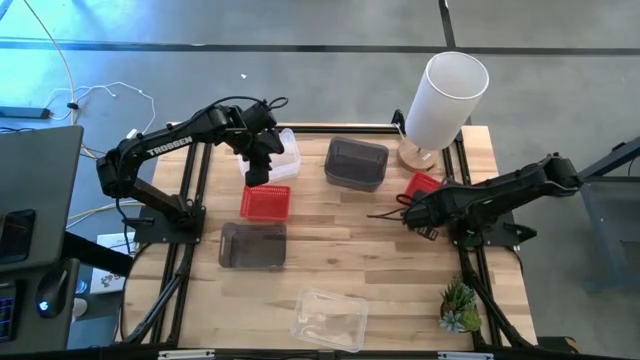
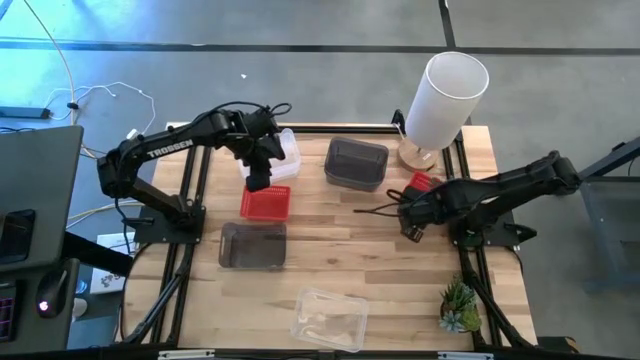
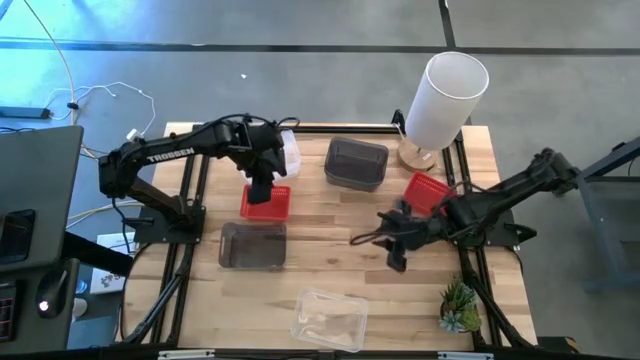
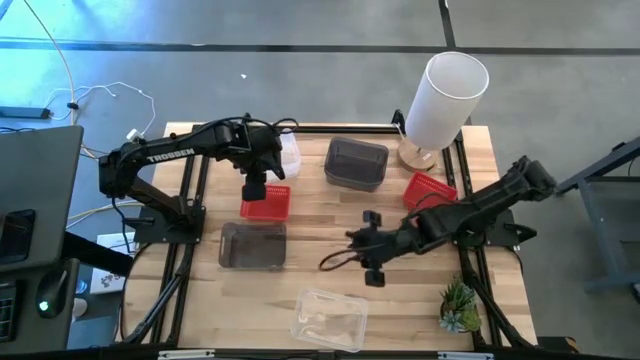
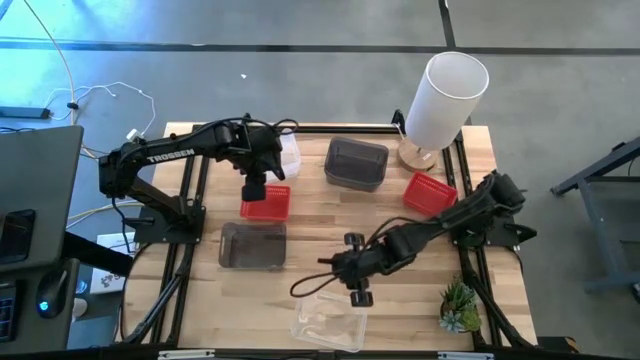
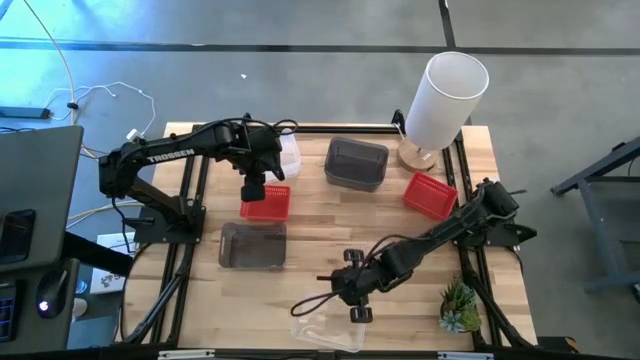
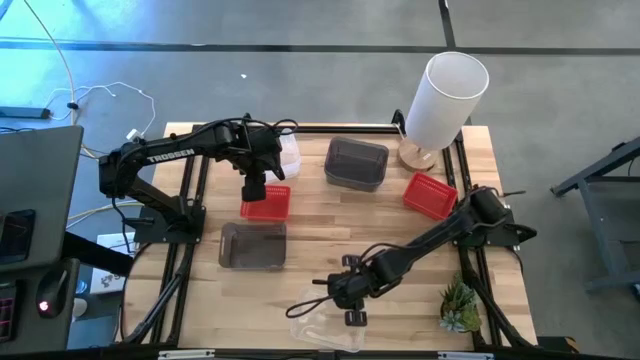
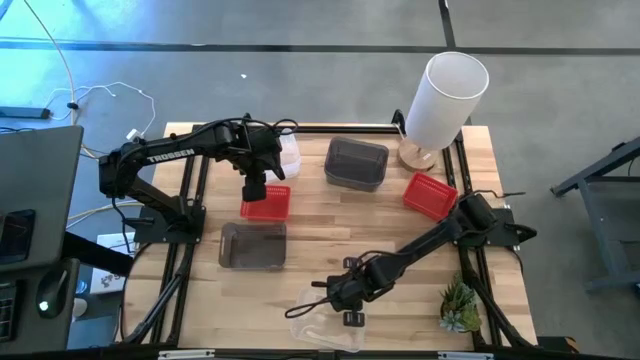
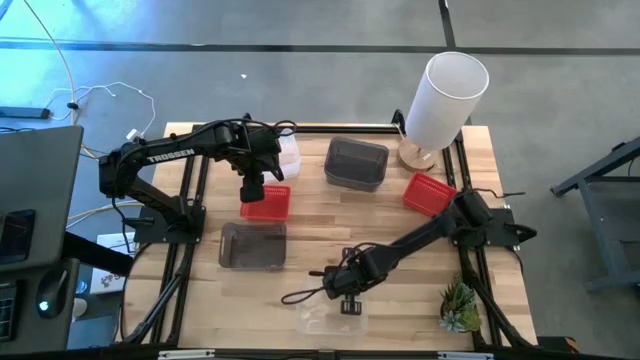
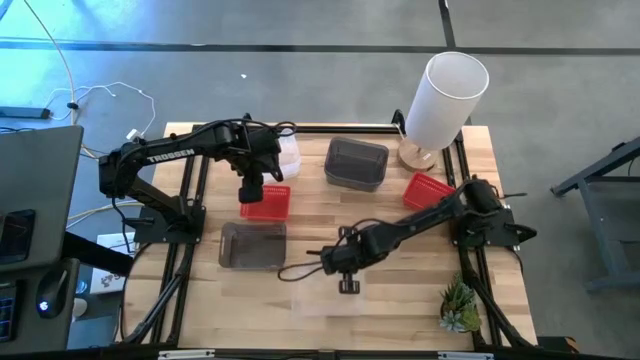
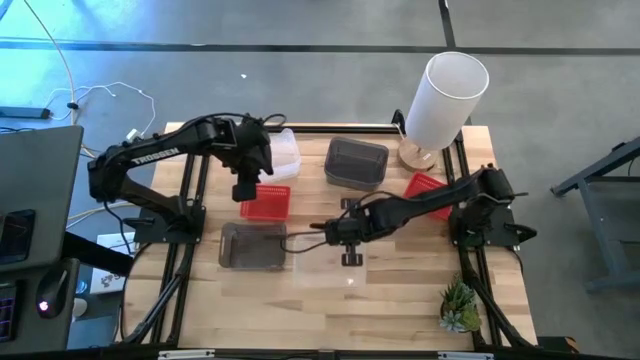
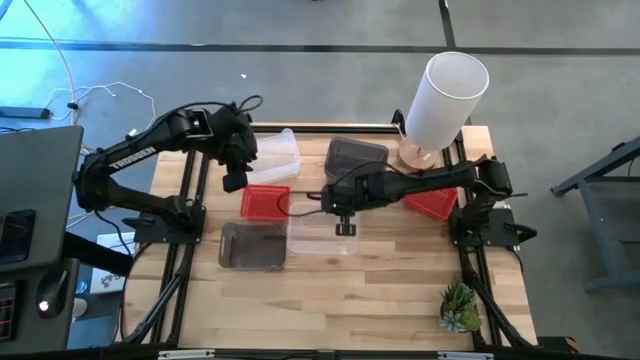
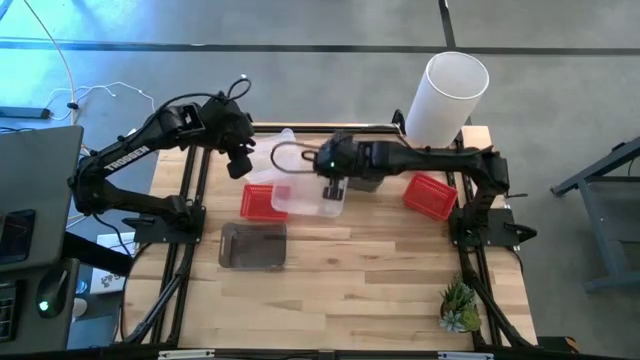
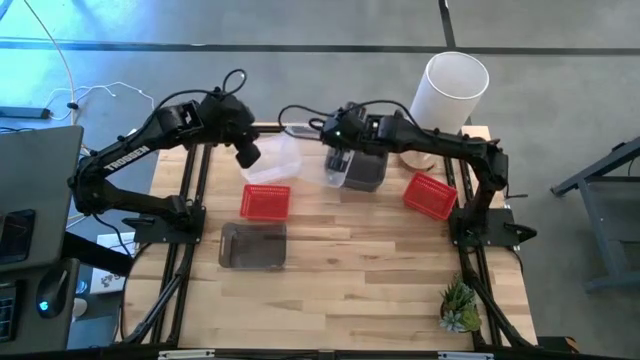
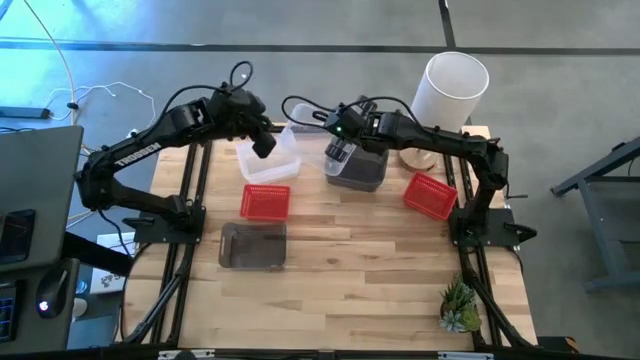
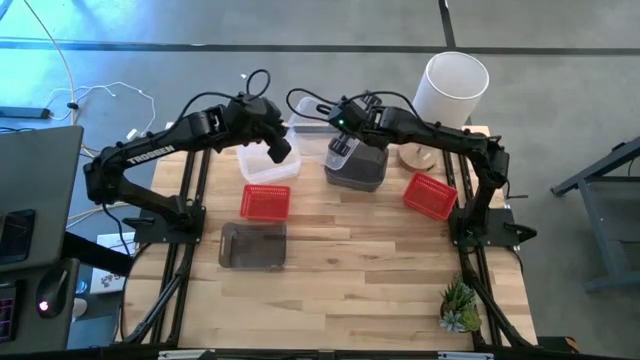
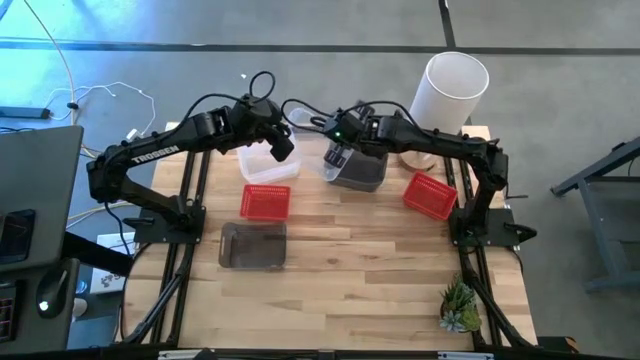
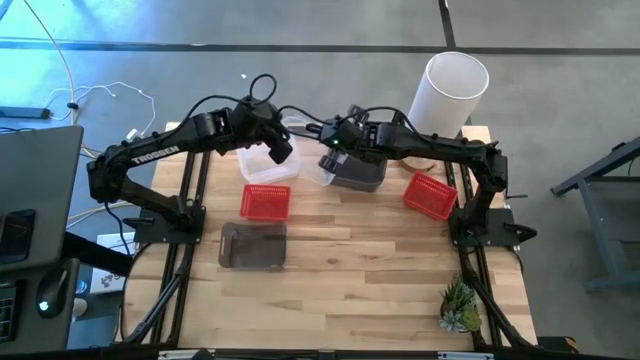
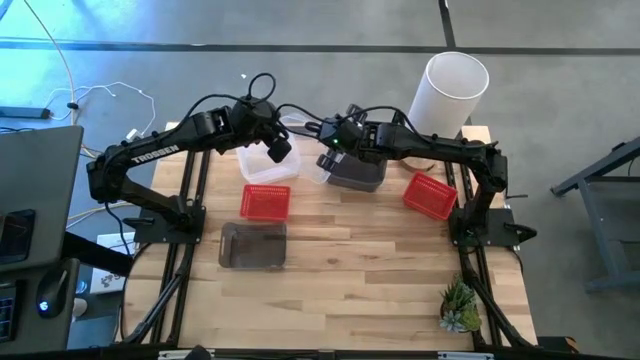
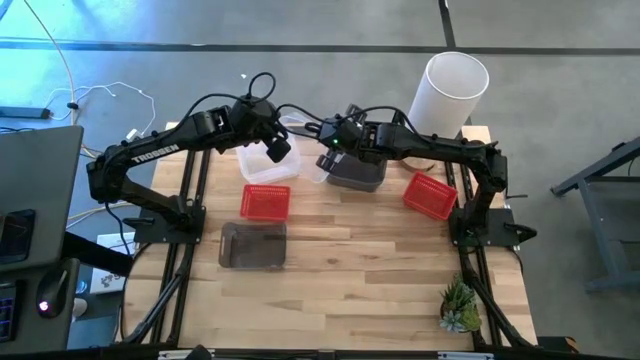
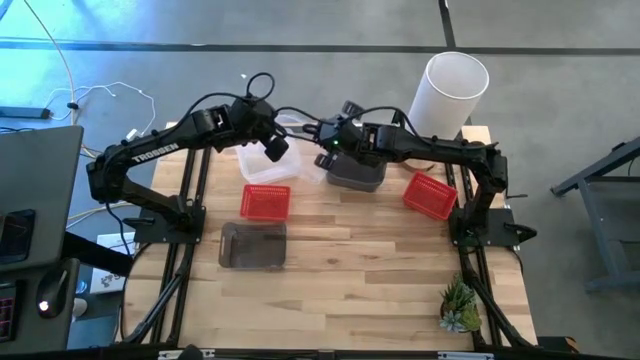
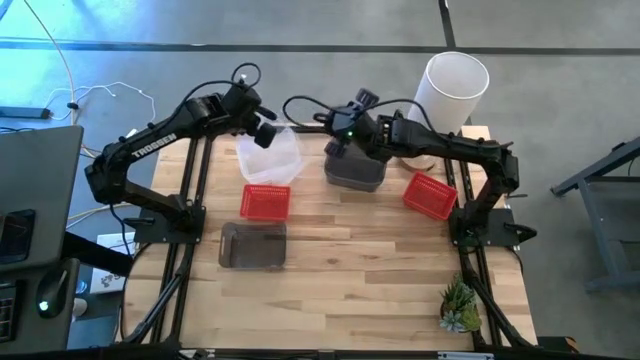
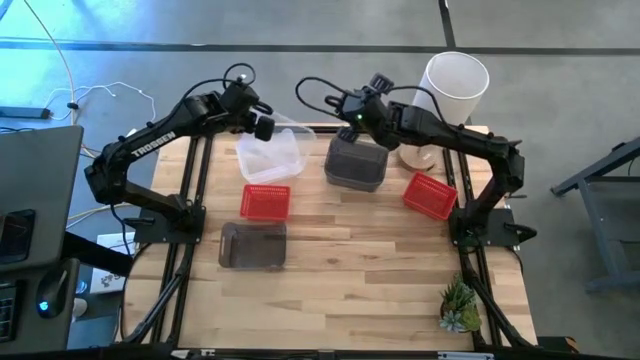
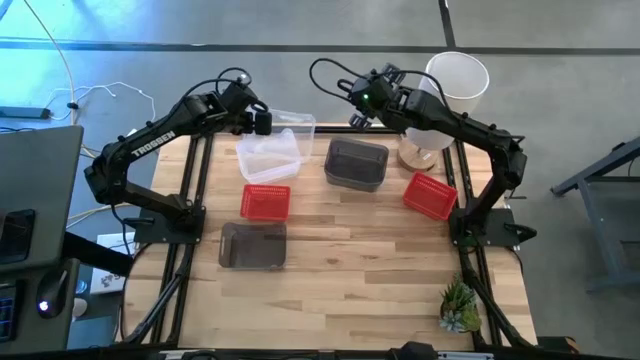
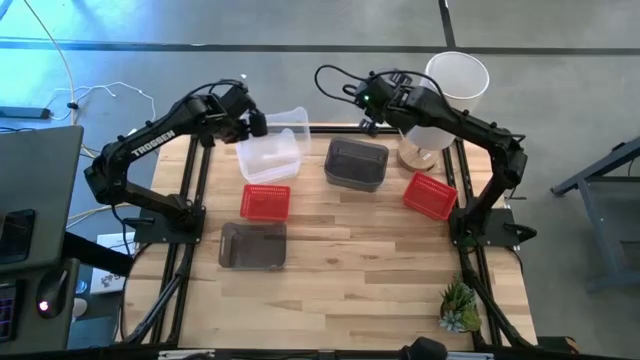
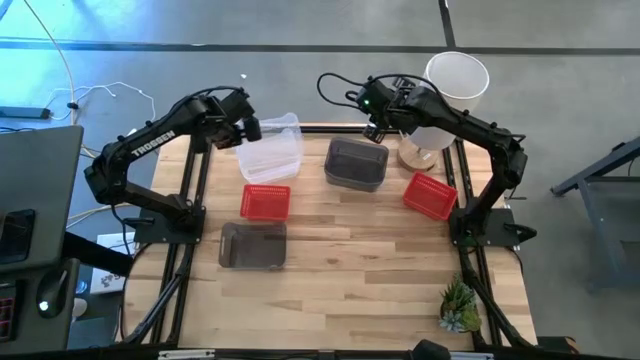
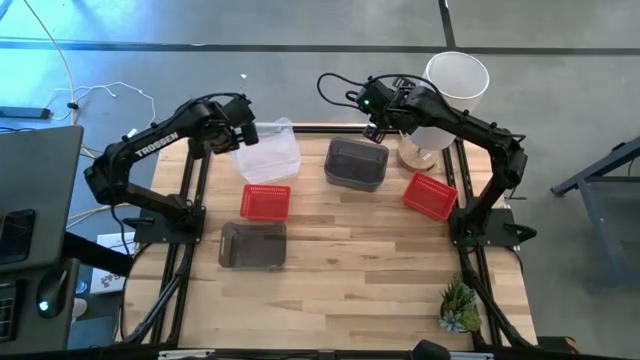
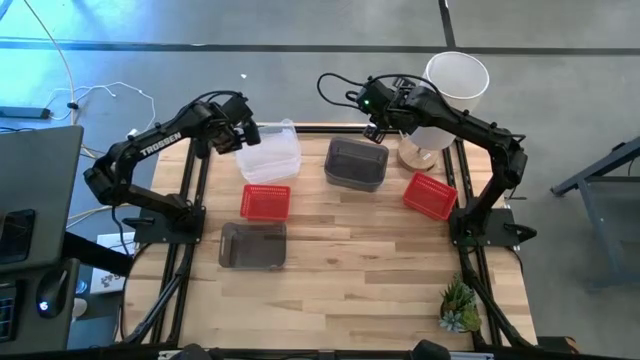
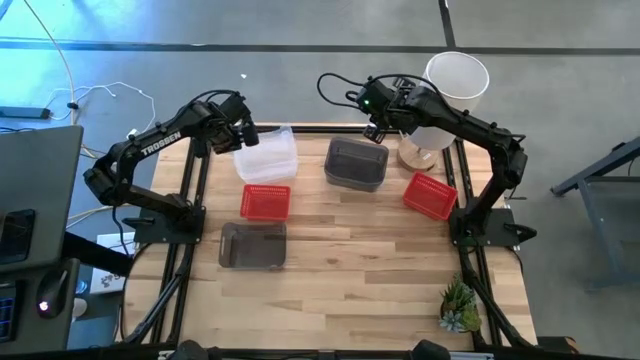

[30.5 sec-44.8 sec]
Stack the bottom transparent bin on the top transparent bin
